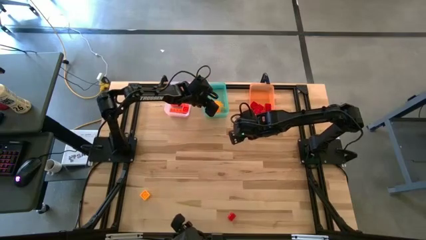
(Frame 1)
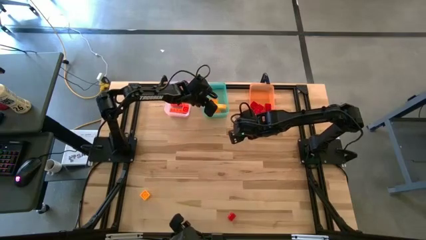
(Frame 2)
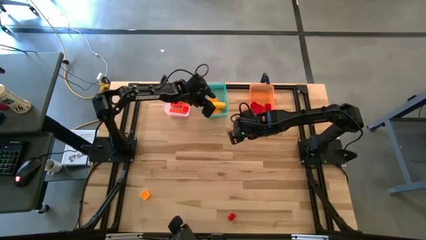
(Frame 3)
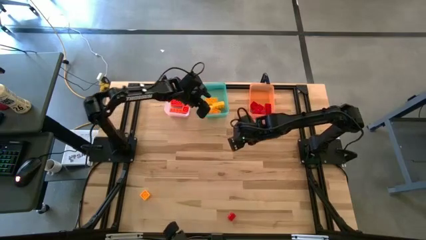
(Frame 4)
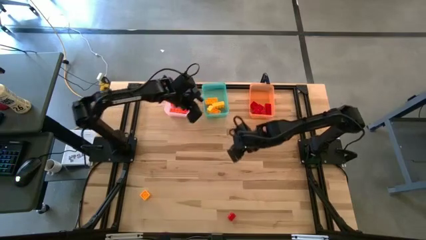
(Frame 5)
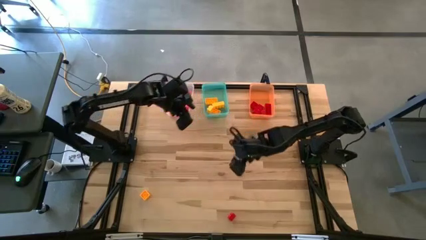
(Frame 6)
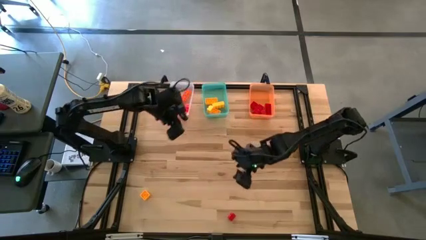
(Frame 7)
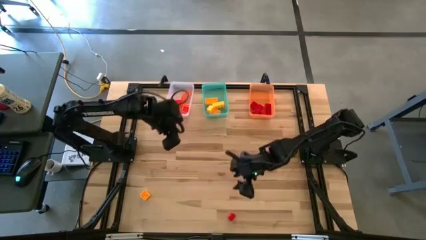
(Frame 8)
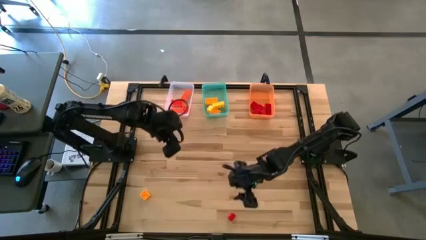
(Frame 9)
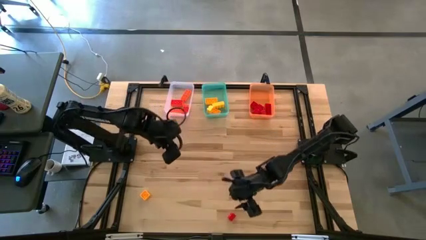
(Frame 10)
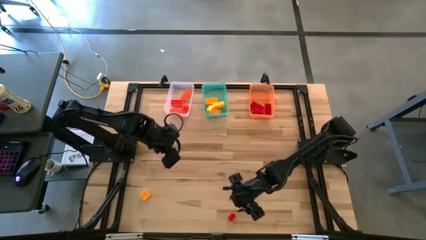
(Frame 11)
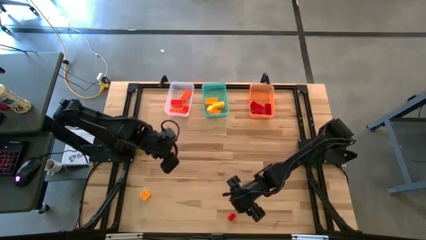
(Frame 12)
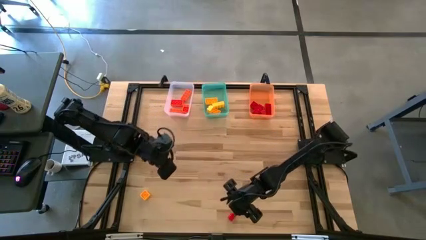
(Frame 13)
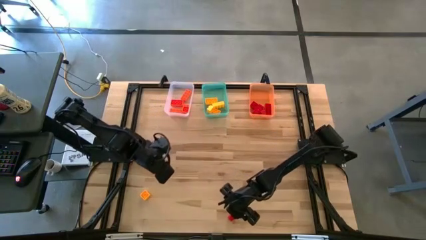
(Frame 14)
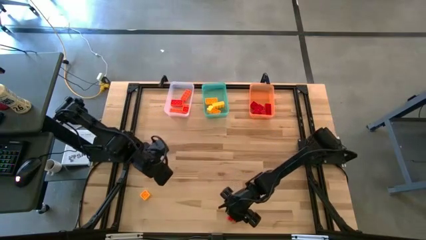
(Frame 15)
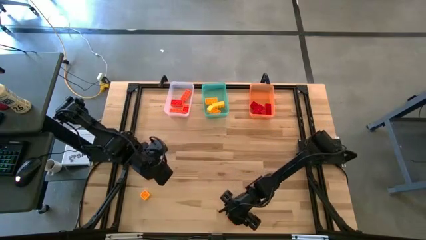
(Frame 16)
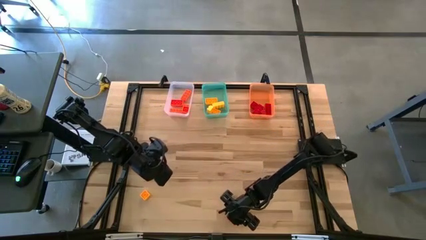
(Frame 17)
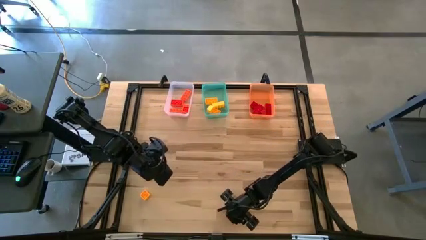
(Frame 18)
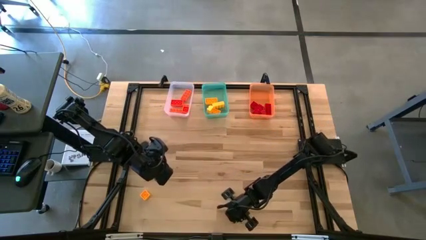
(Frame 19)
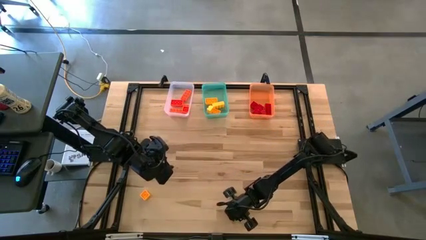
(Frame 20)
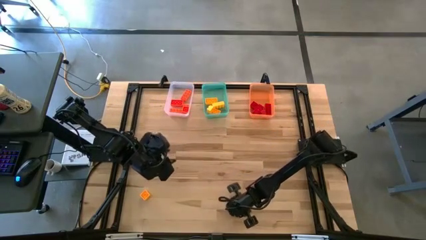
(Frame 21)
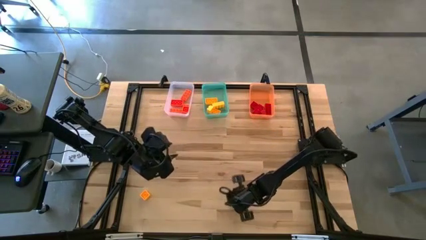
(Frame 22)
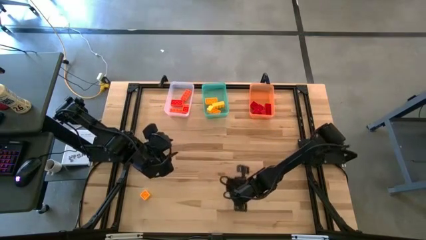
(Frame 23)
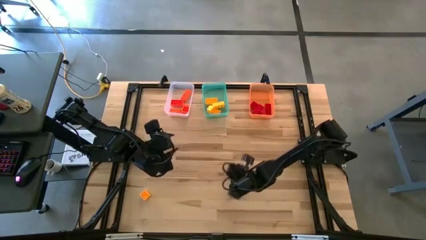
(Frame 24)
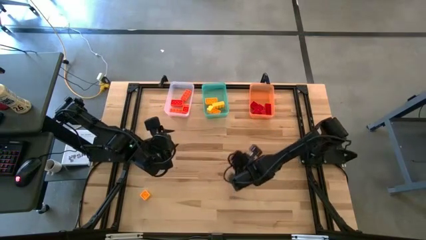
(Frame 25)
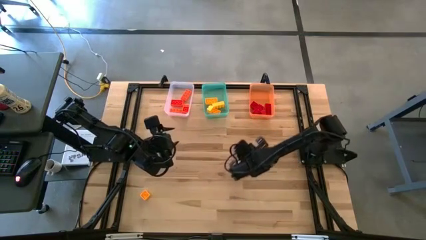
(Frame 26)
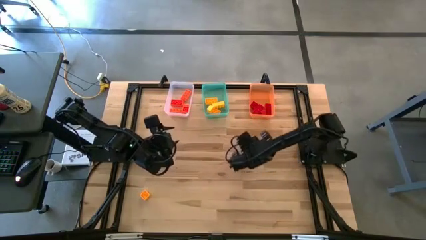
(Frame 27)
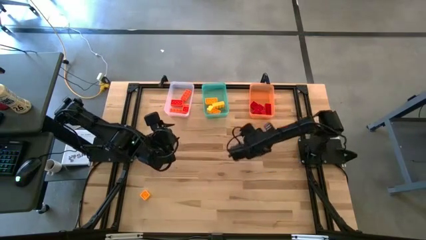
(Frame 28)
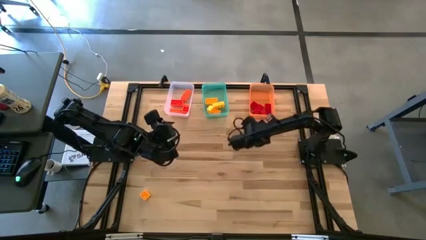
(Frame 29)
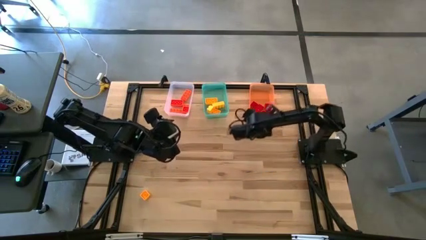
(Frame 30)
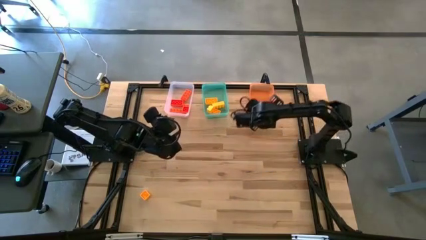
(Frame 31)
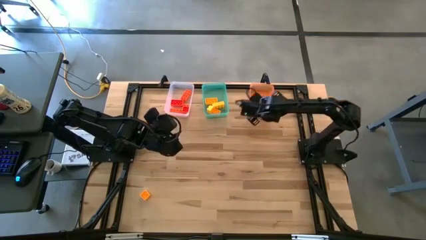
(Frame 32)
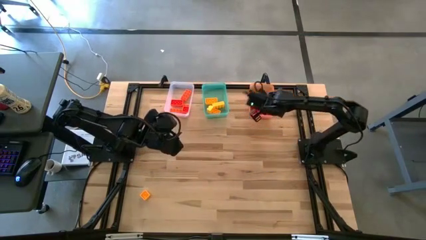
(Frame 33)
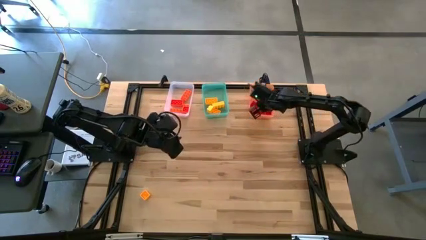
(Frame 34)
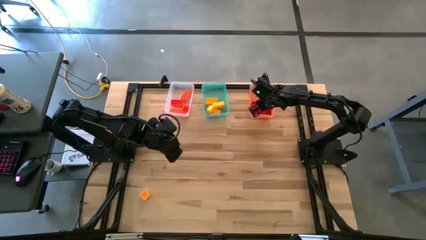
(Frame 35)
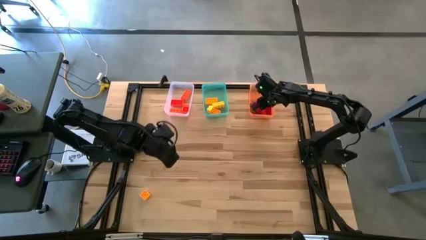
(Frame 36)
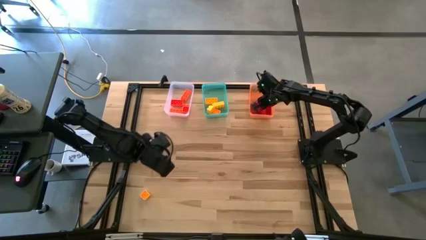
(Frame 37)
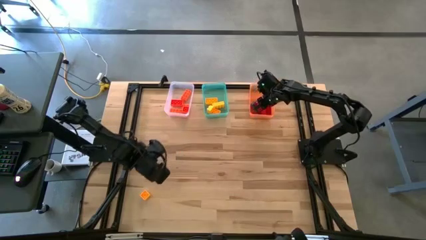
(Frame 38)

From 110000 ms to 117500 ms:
Task: Sort & place blocks by color
Put the red game piece into the orange bin

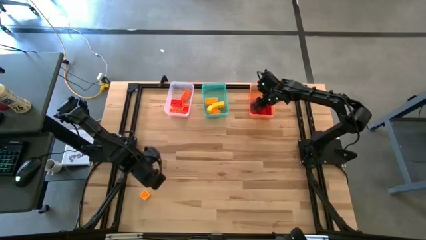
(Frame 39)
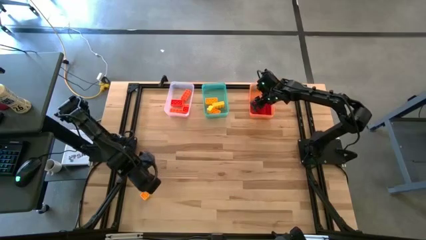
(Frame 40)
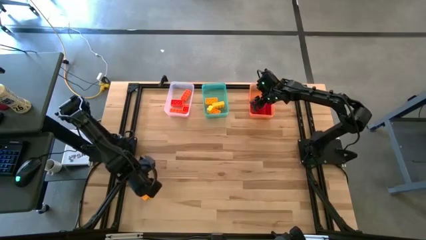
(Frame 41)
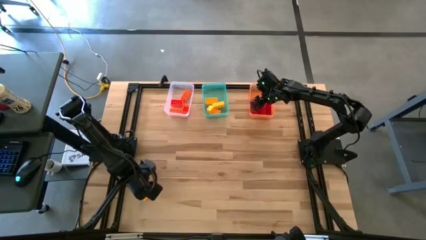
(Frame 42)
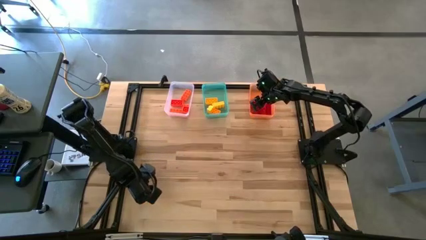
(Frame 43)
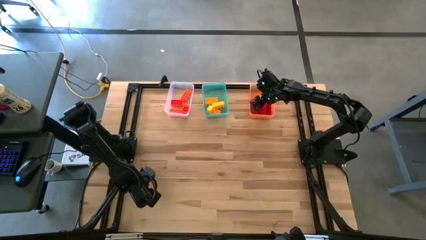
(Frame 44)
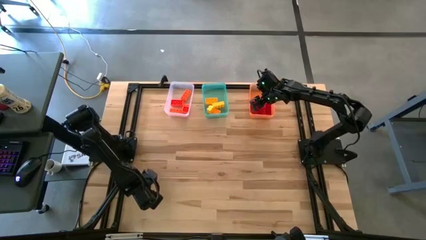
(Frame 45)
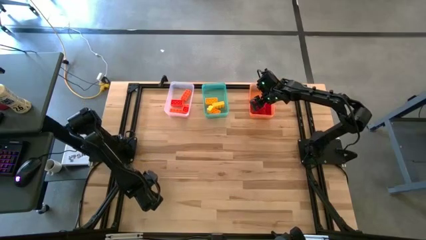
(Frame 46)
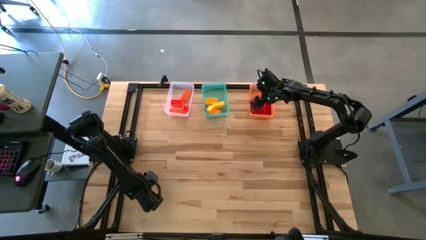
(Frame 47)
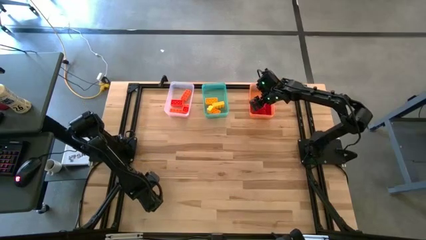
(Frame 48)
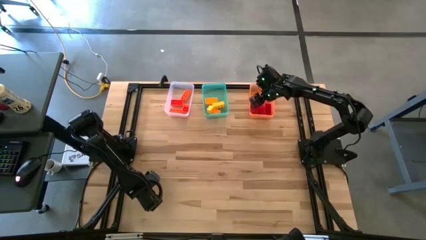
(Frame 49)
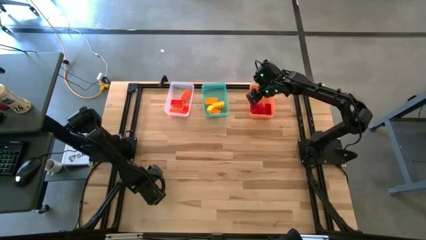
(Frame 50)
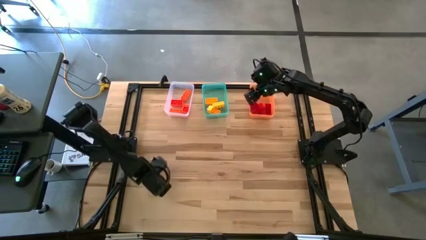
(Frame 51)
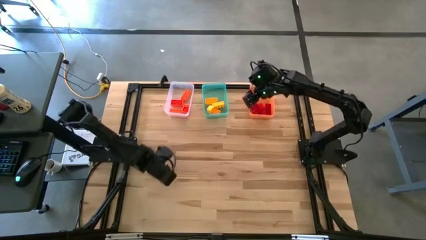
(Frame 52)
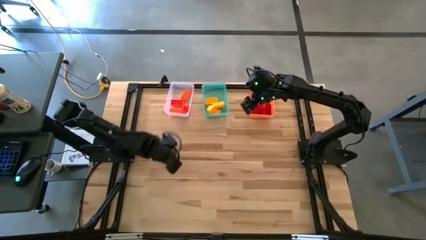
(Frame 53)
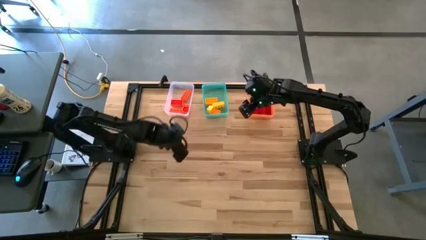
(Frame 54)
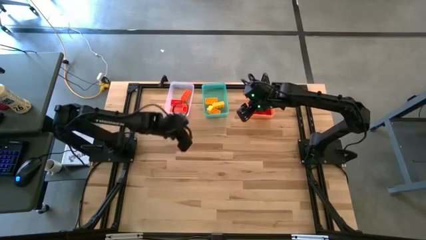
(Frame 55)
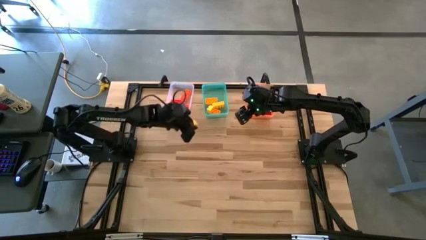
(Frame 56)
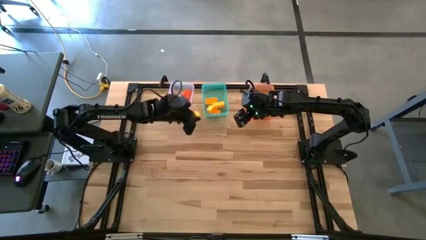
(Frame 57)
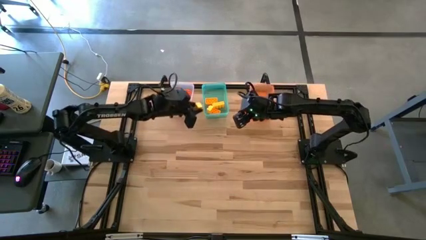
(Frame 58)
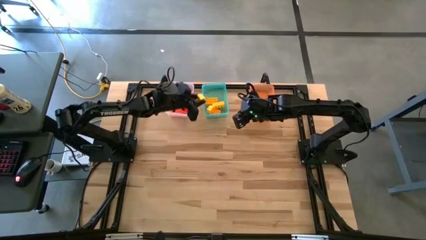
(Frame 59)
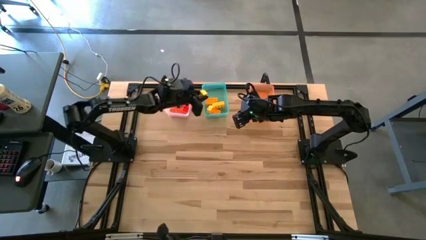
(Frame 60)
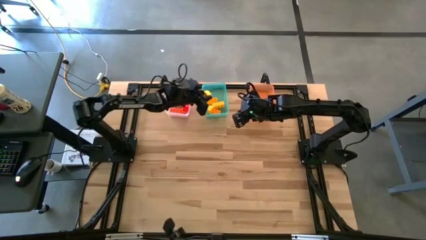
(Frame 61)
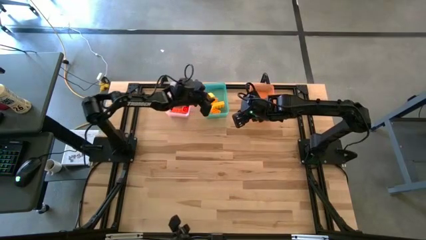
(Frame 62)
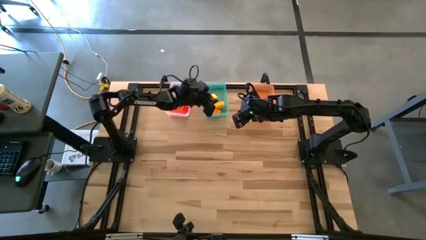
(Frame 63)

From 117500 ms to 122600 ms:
Put the yellow game piece into the green bin

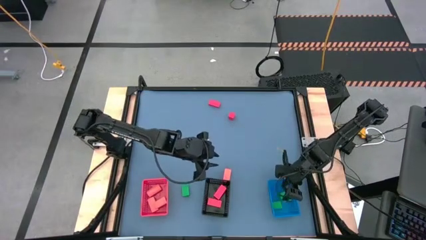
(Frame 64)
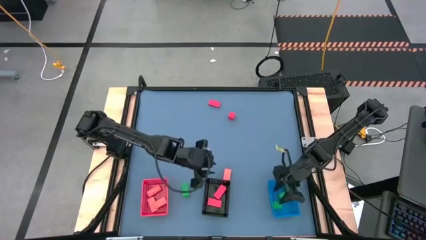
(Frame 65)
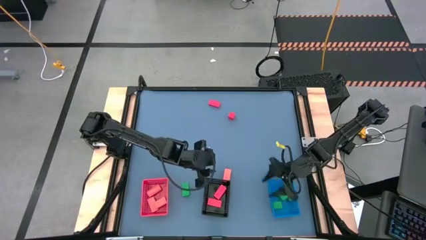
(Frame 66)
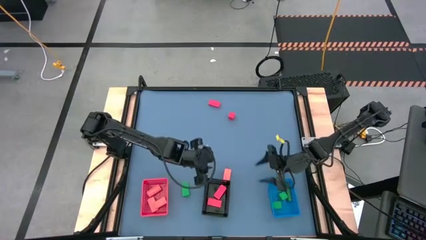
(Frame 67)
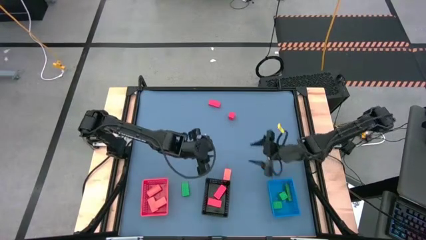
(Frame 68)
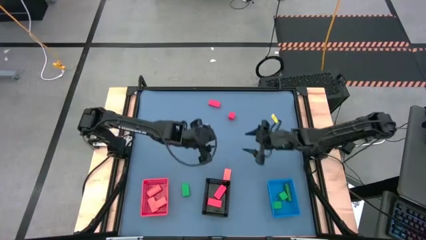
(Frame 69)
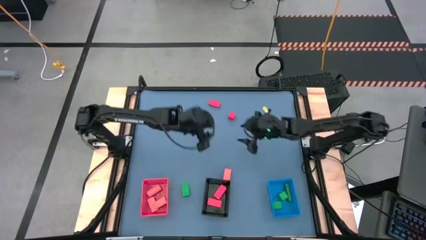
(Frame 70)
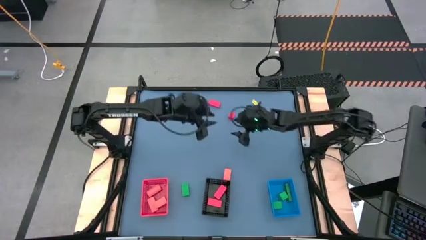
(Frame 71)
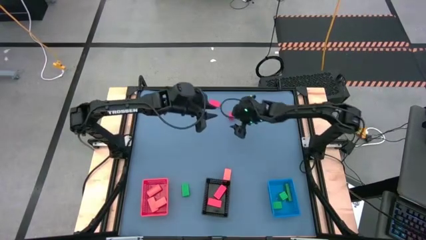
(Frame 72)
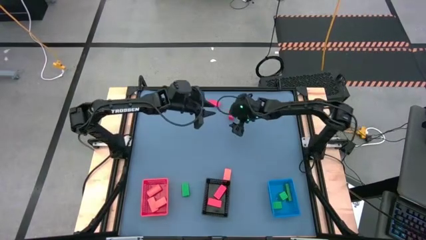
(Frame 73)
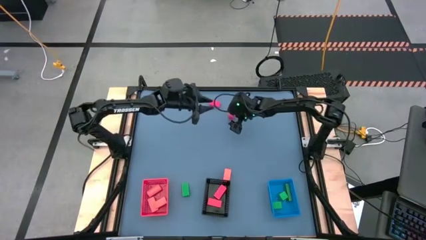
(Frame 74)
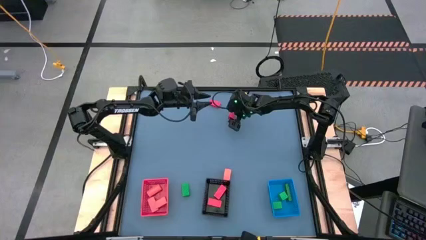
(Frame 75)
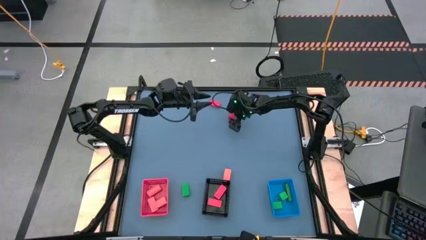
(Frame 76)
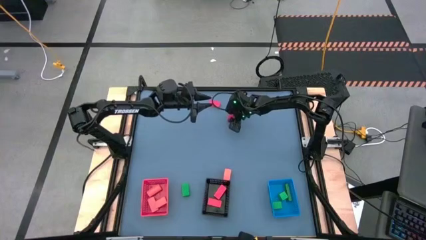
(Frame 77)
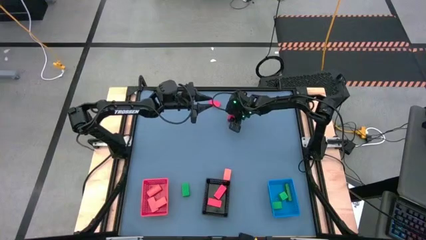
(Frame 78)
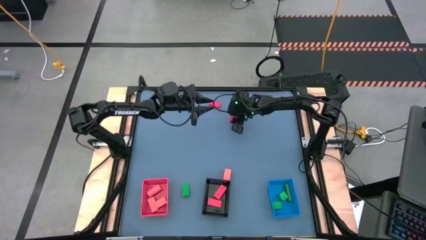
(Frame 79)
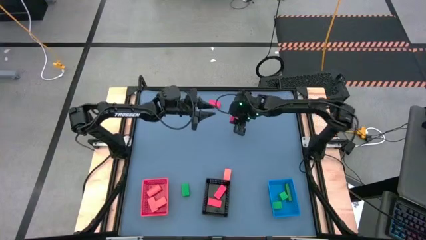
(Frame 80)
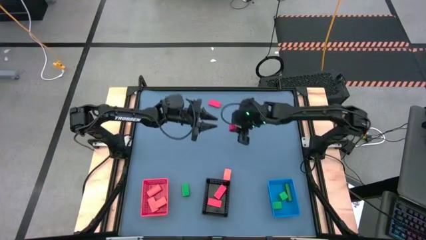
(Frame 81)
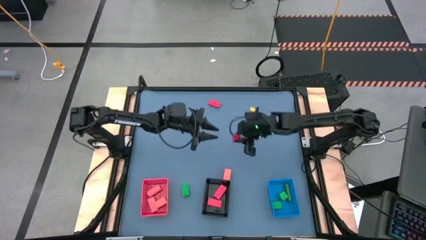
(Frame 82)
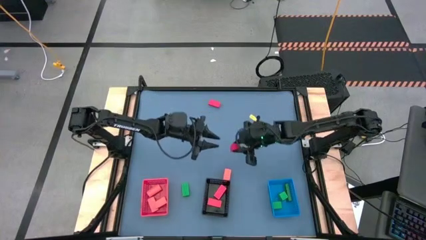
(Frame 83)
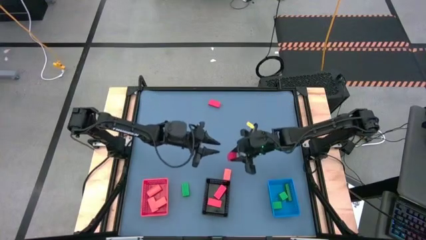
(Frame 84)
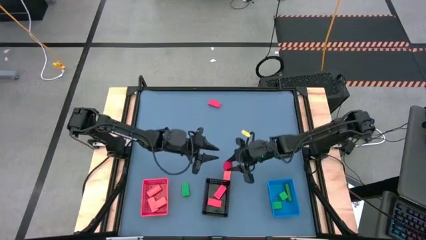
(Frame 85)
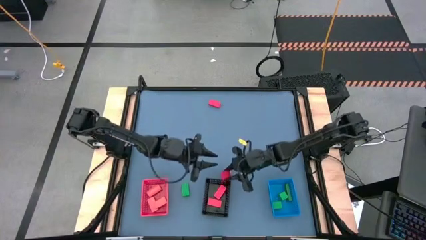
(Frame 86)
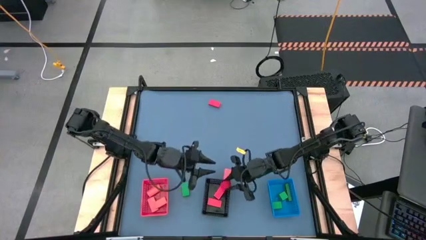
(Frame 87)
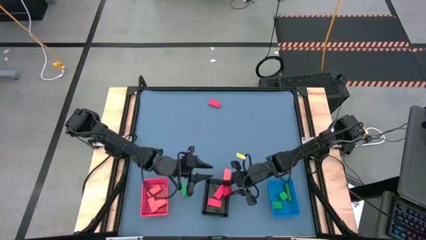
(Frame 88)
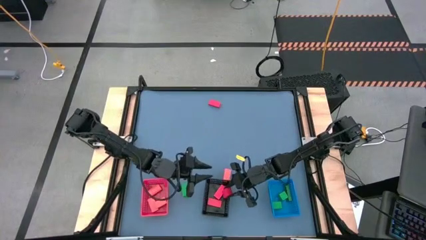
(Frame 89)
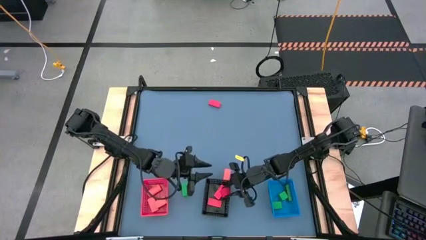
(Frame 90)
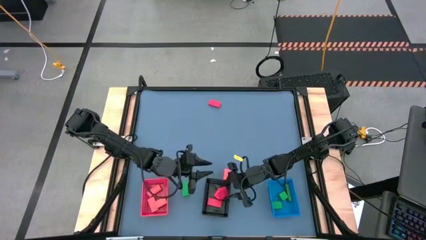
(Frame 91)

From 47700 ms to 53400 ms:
Task: Sort & place blocks by color
Put the red block into the black bin
